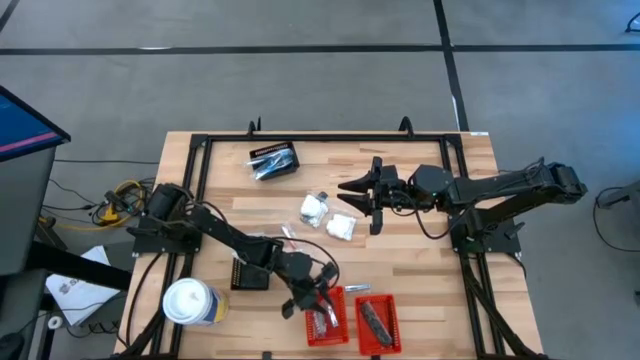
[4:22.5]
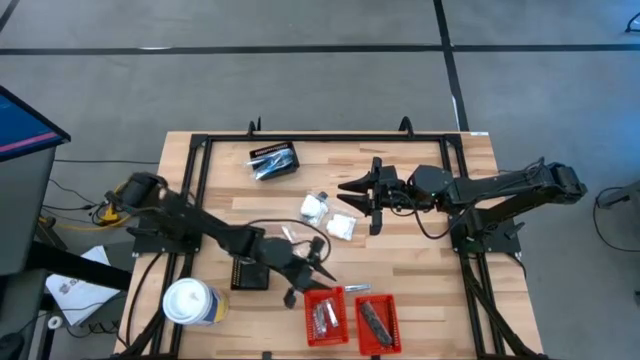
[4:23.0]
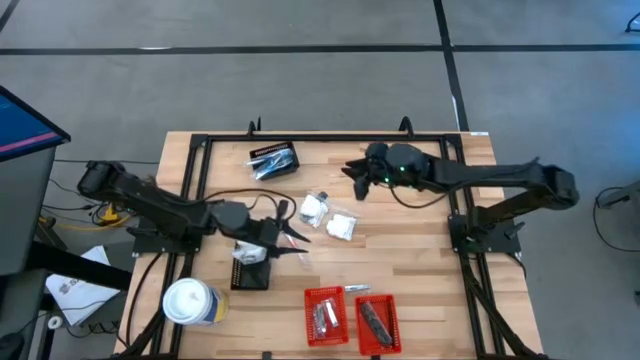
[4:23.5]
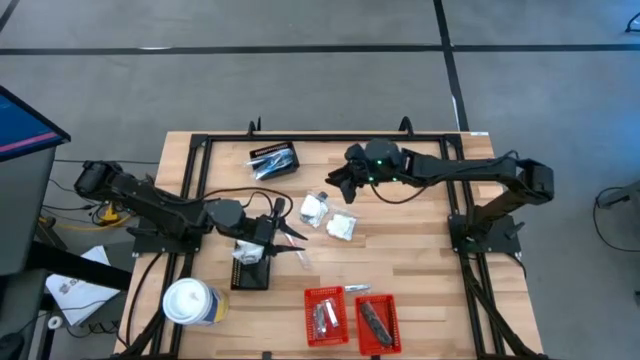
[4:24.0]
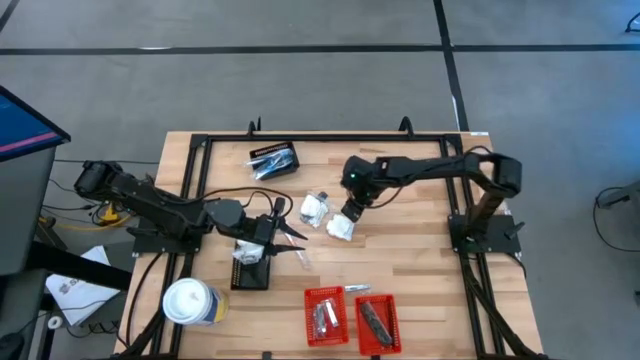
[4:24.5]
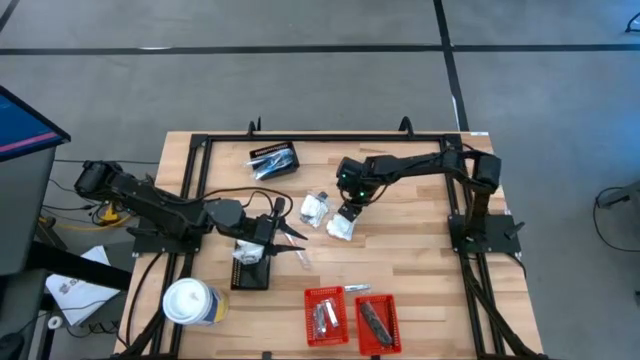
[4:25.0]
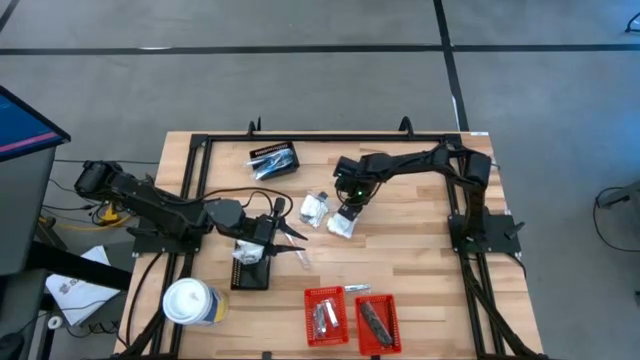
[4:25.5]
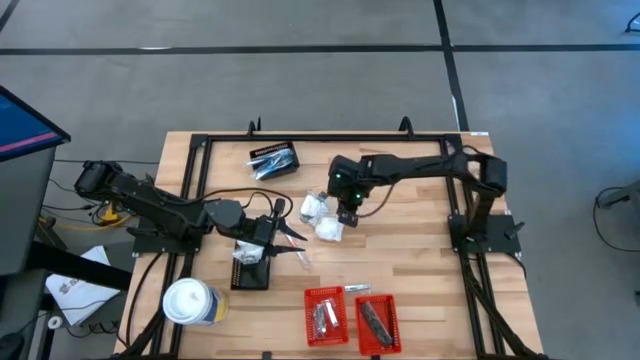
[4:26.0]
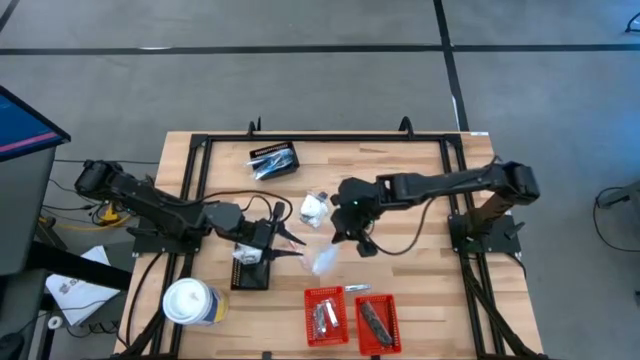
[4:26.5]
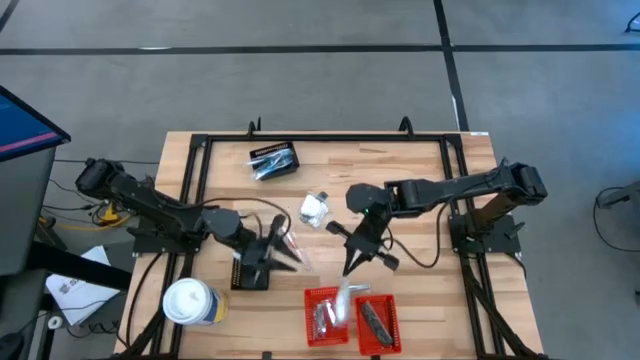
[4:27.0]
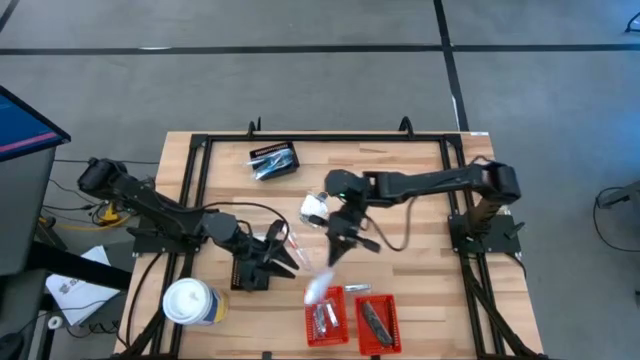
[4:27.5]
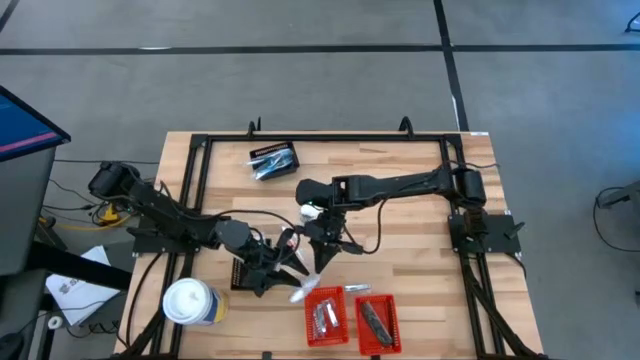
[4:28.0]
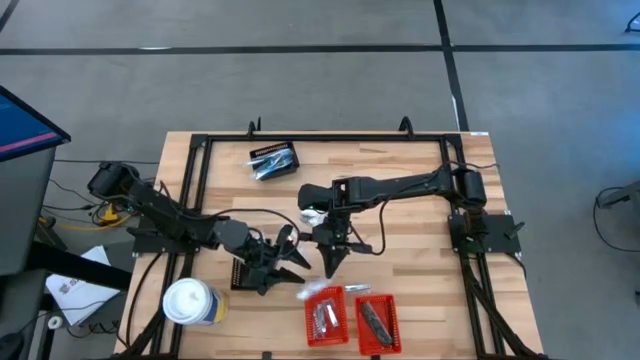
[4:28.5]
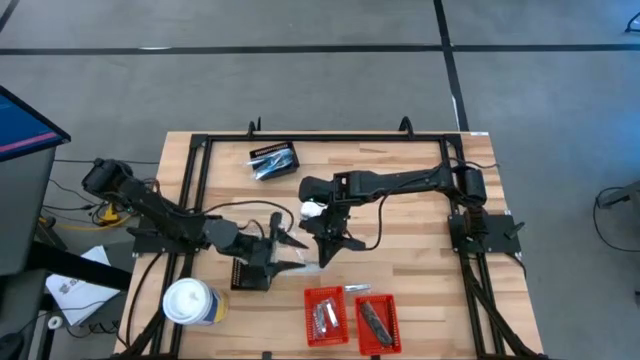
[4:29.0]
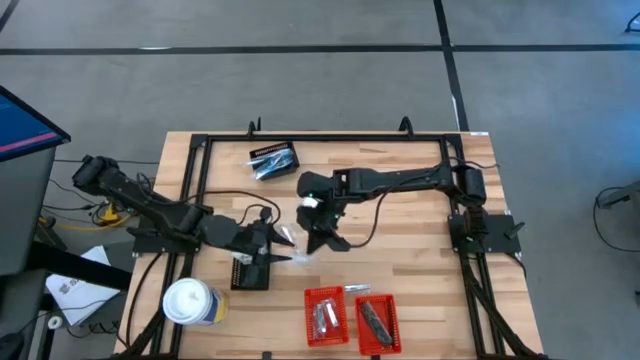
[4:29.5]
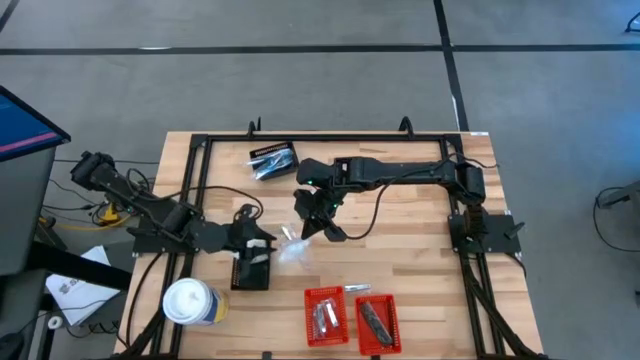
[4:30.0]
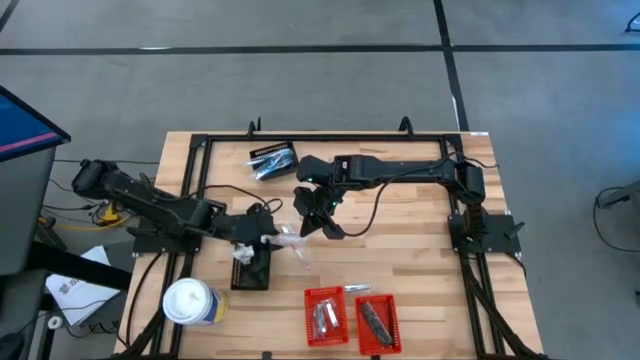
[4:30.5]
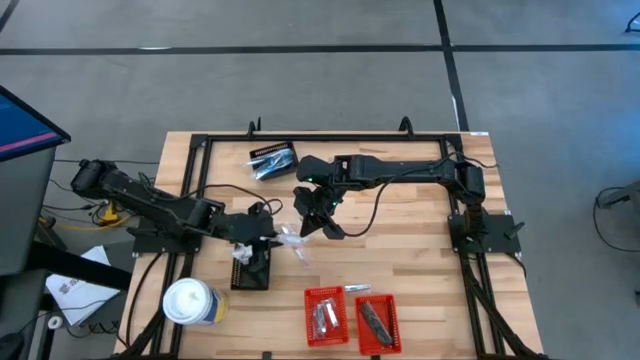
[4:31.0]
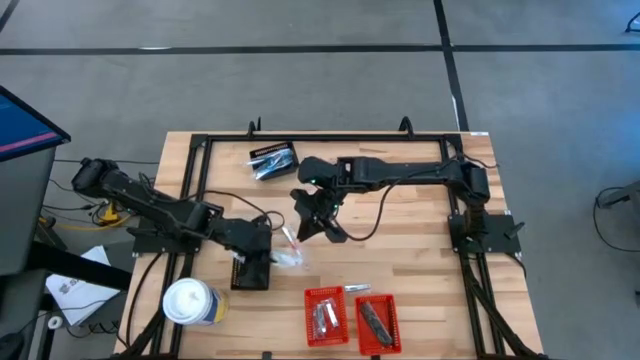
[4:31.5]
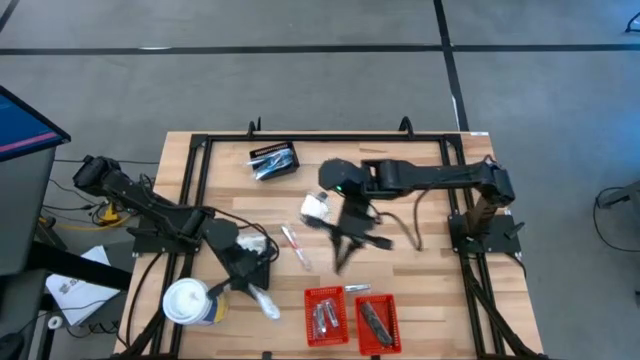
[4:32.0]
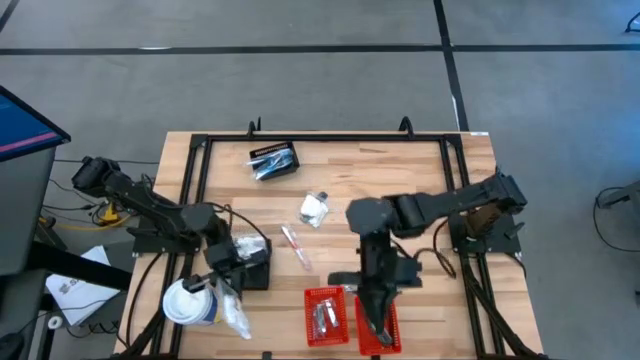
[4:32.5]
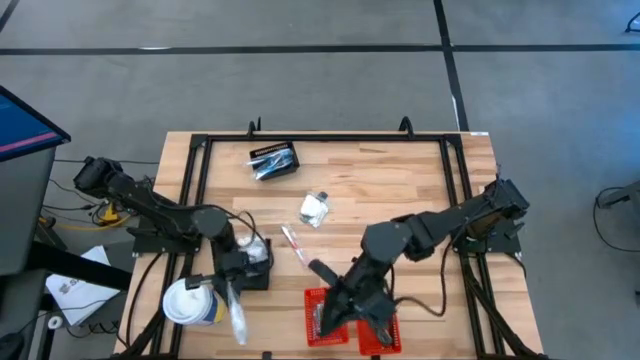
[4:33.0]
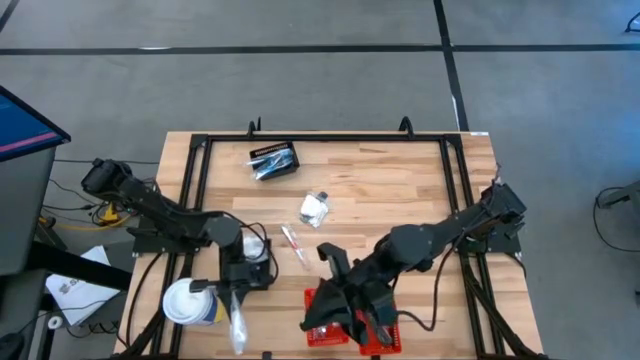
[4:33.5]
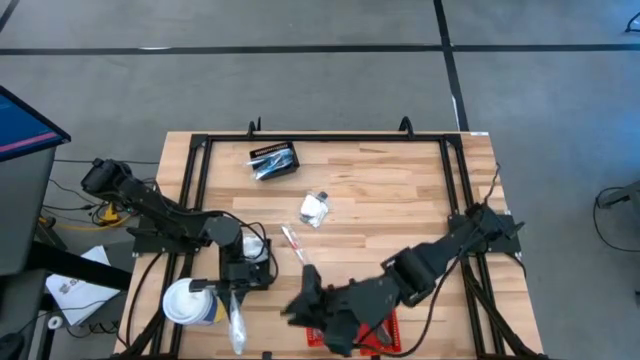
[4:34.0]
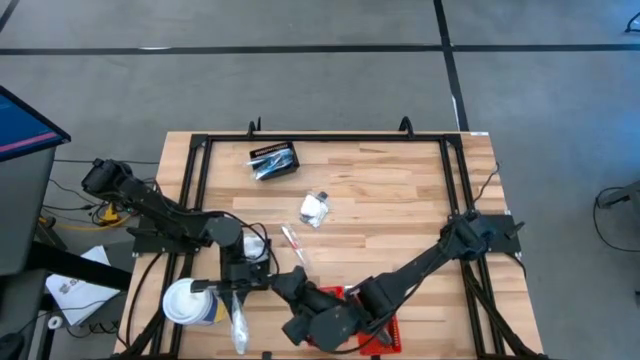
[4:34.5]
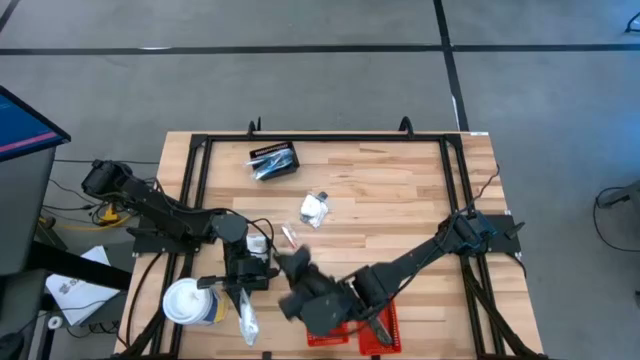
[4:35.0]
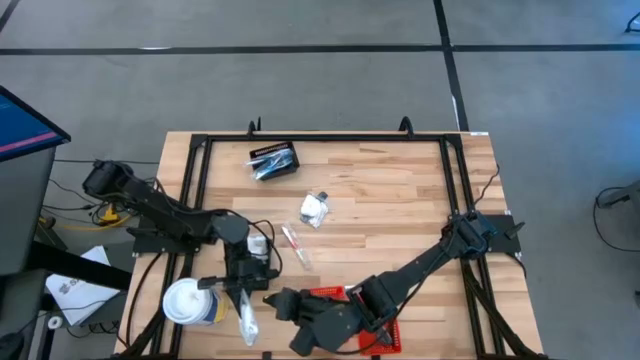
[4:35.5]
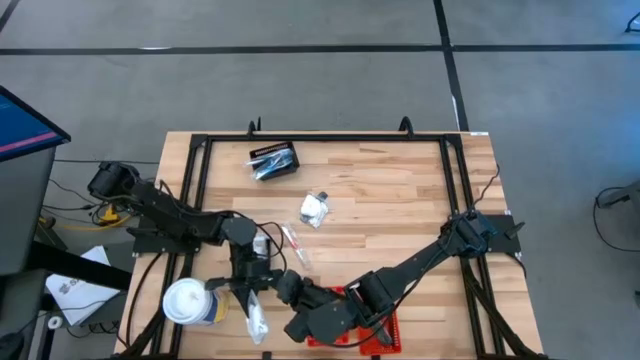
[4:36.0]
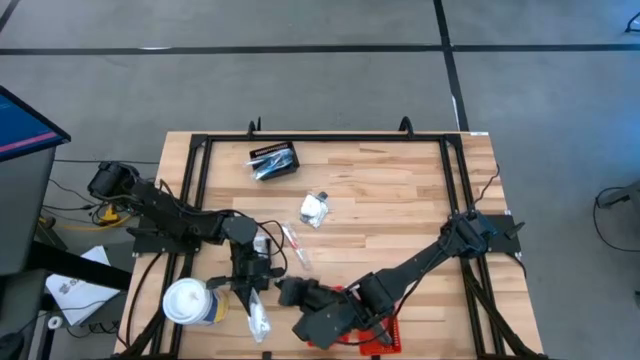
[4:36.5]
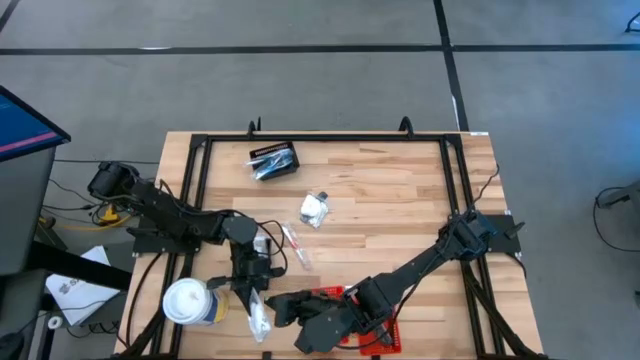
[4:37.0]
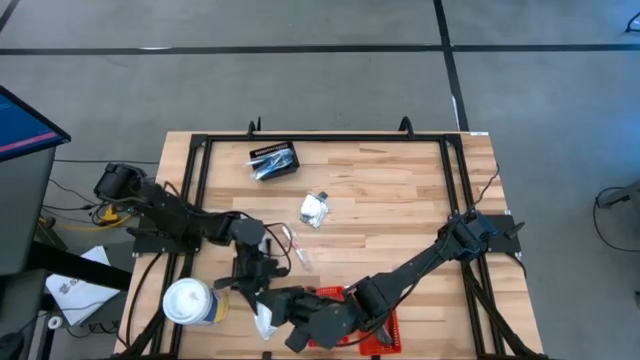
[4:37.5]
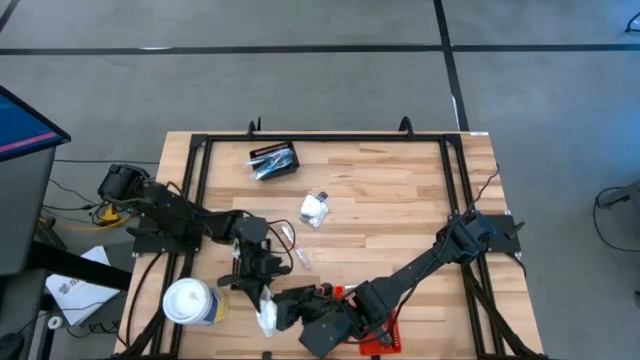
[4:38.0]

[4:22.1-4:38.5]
Task: Pick & Place Travel size toiletries
Put the cotton pack into the bottom black bin

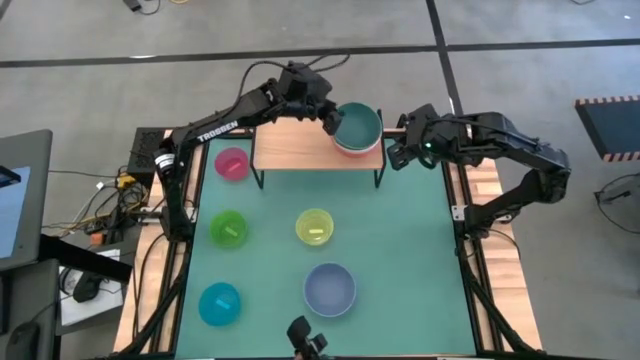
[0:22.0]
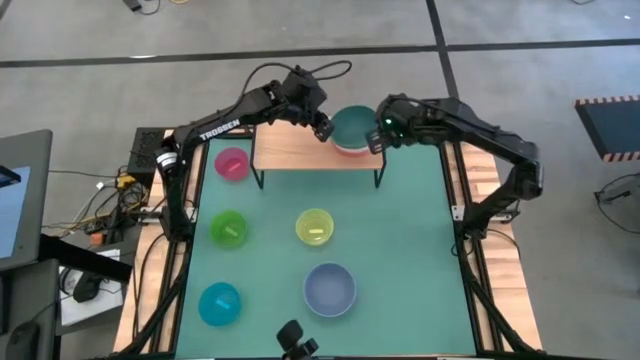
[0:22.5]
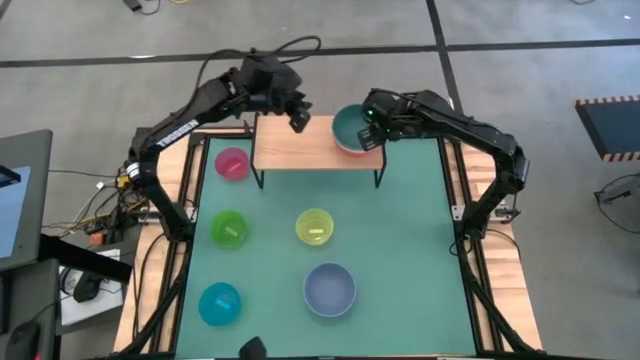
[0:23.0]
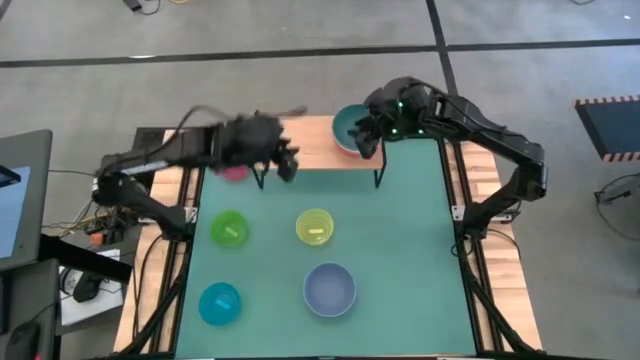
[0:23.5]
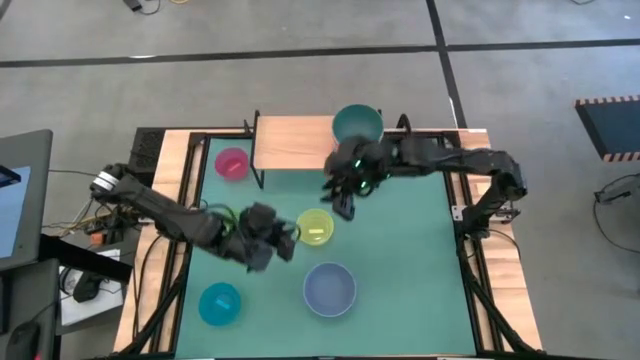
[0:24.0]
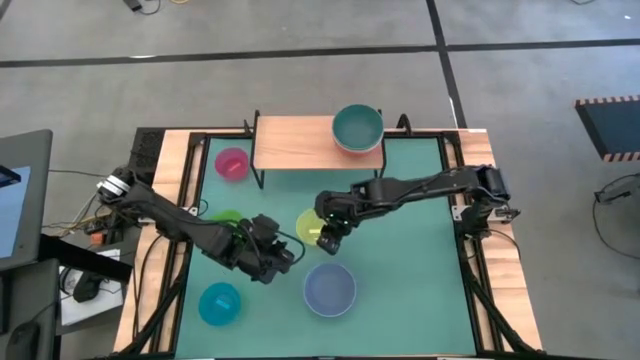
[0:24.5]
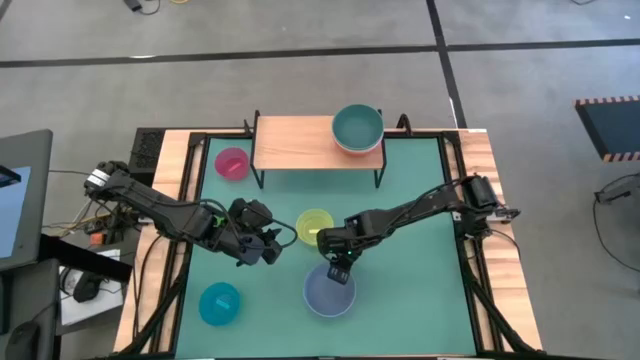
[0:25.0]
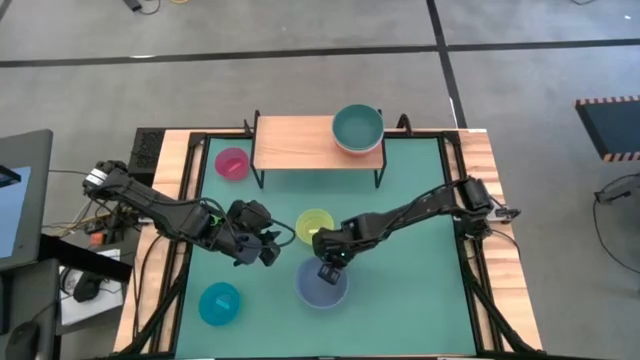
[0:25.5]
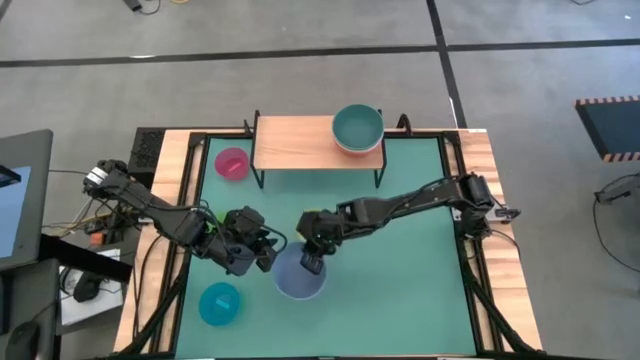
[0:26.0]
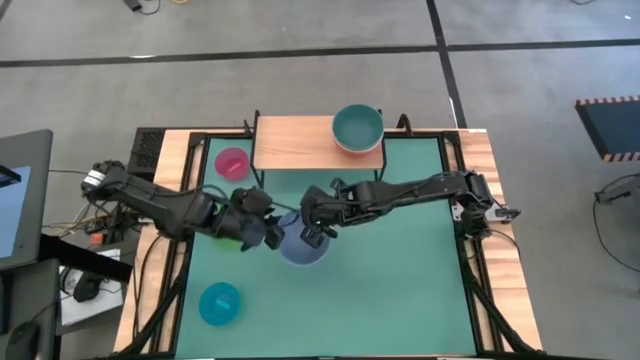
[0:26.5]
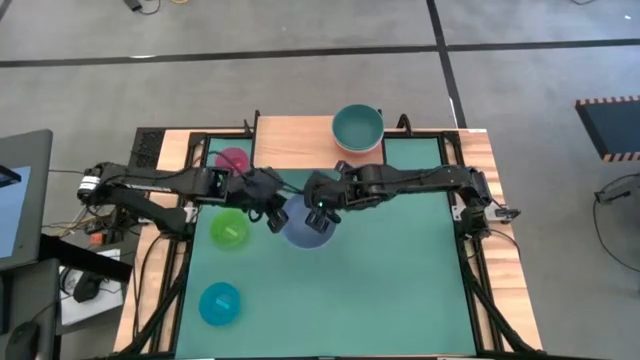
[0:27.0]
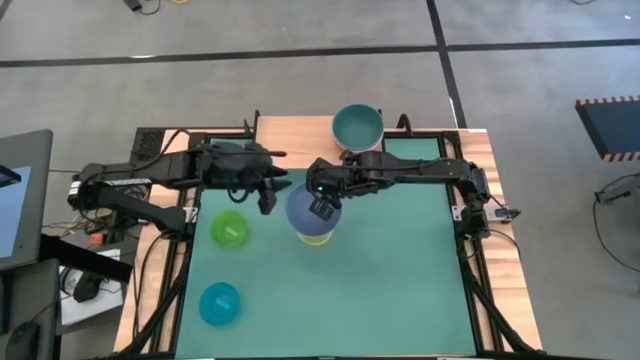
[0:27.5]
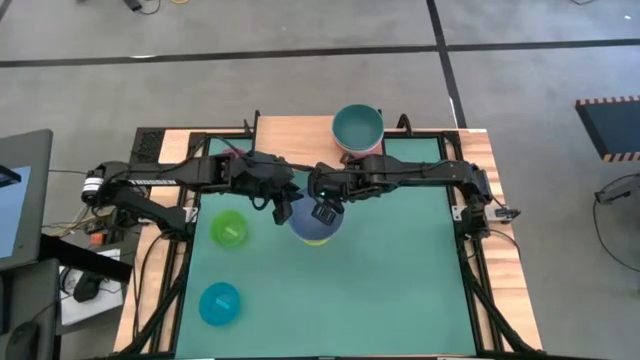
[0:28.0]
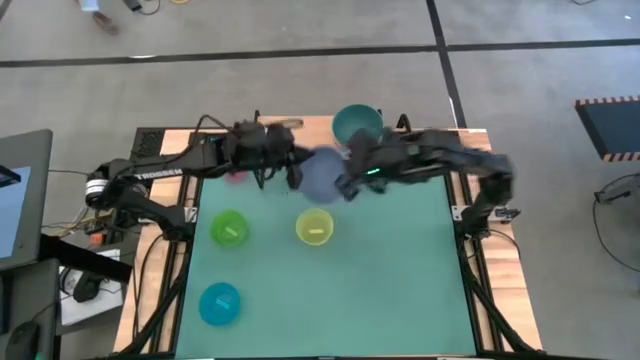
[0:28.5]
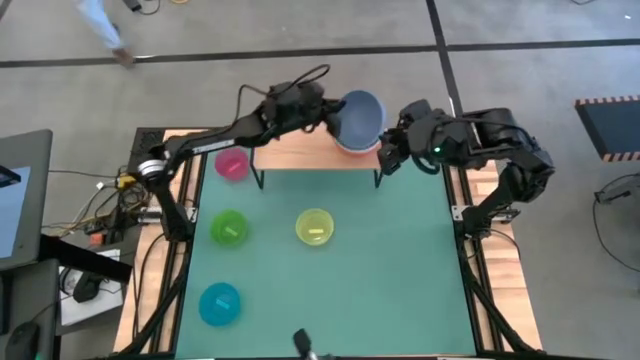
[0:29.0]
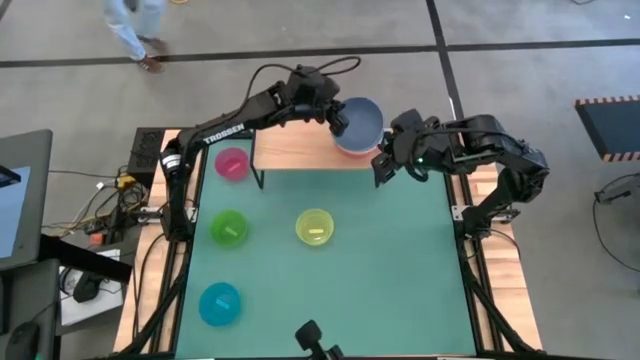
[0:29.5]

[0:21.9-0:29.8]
Task: Place and stack bowls onto a shelf
Stack the light blue bowl on the green bowl on the shelf
